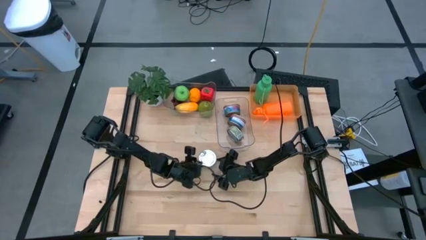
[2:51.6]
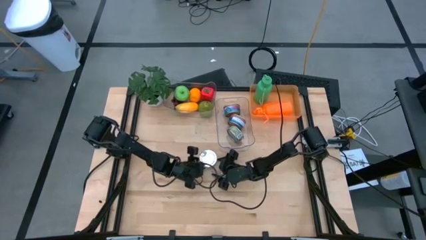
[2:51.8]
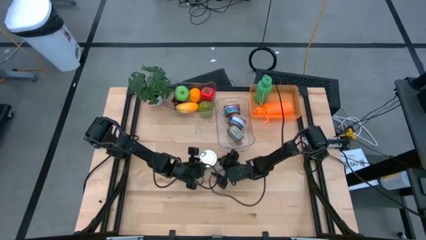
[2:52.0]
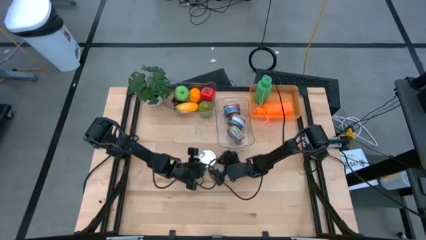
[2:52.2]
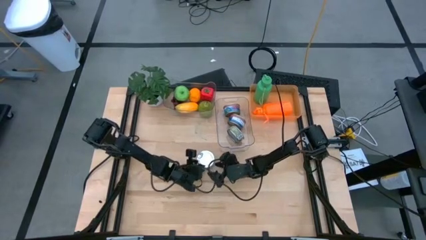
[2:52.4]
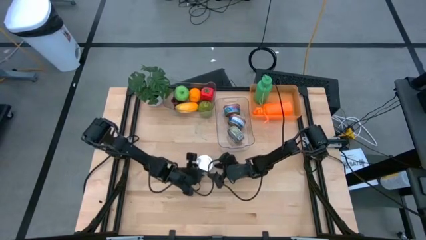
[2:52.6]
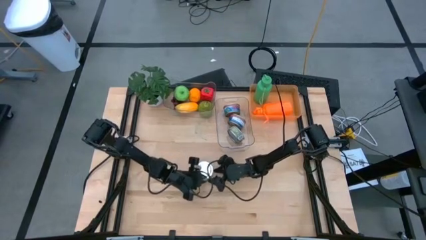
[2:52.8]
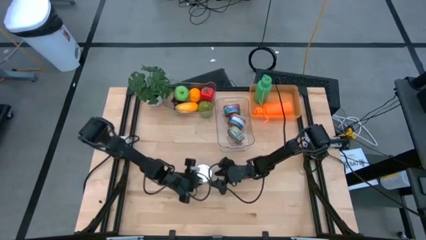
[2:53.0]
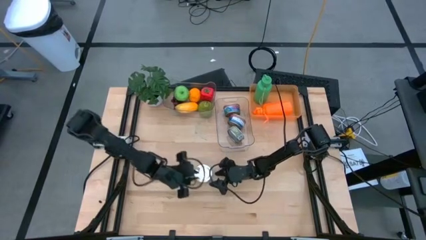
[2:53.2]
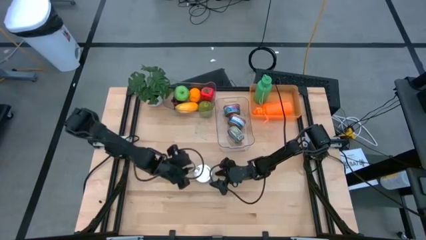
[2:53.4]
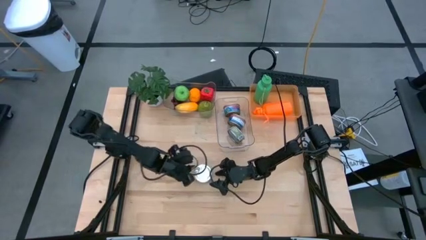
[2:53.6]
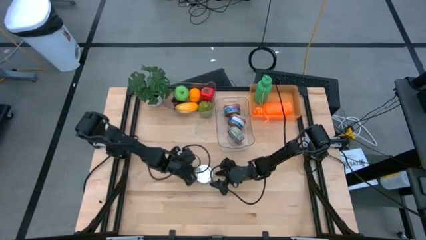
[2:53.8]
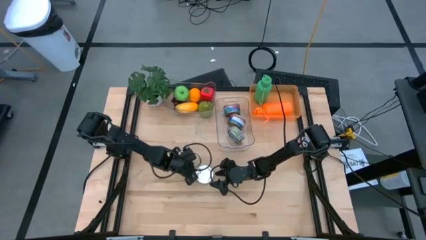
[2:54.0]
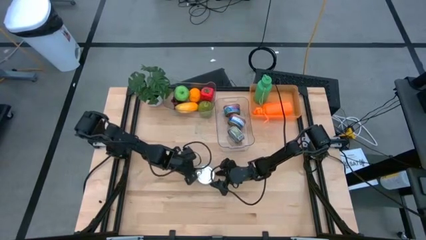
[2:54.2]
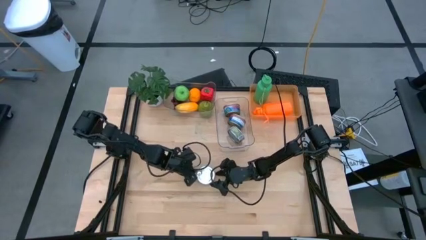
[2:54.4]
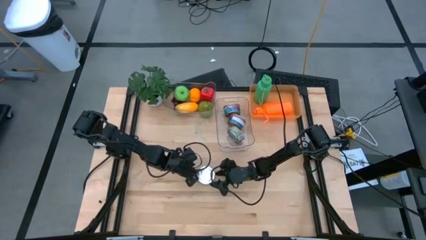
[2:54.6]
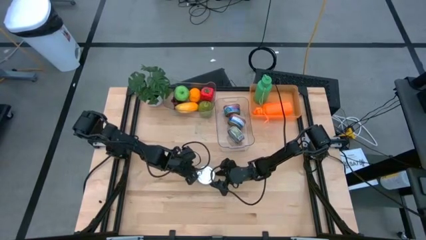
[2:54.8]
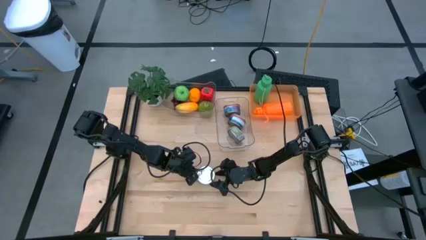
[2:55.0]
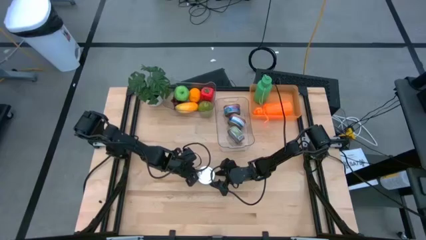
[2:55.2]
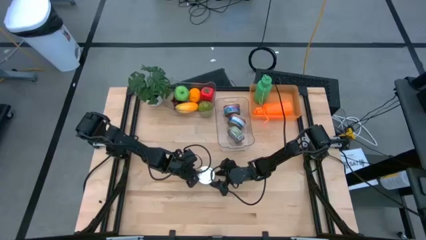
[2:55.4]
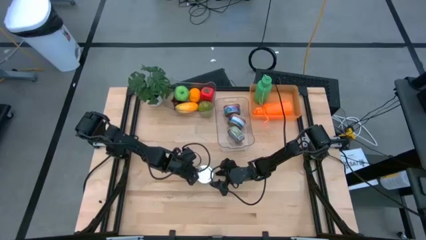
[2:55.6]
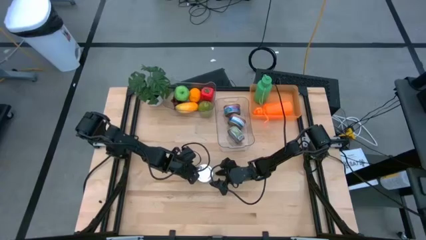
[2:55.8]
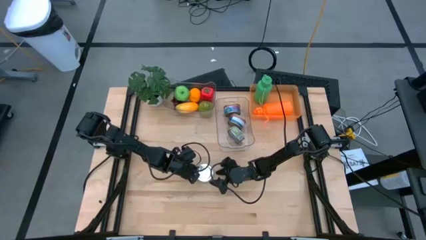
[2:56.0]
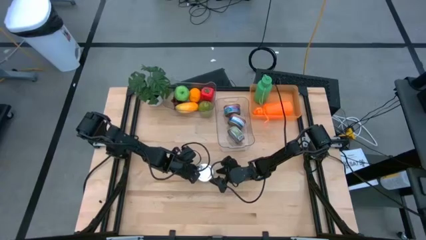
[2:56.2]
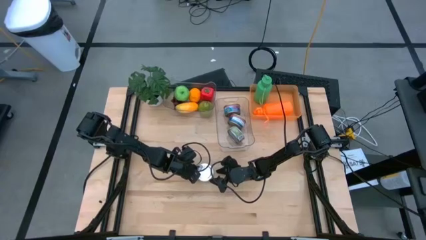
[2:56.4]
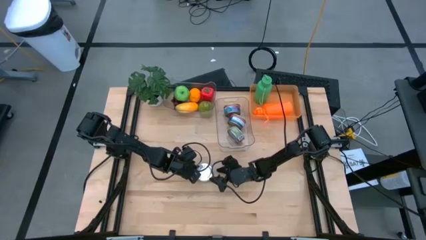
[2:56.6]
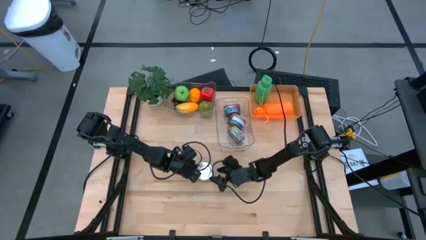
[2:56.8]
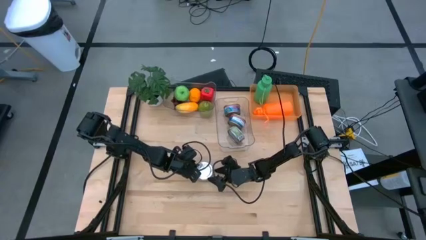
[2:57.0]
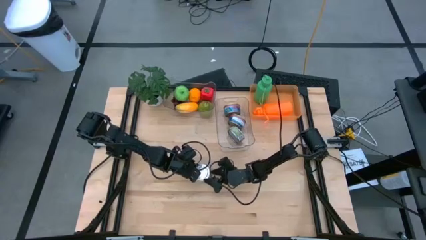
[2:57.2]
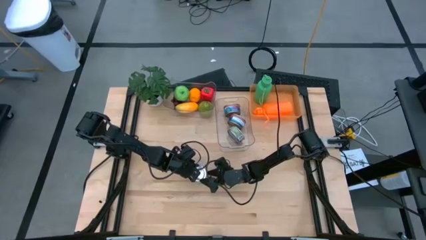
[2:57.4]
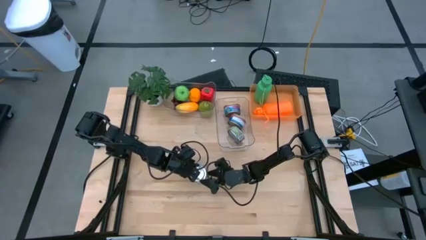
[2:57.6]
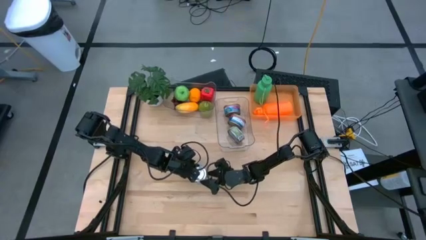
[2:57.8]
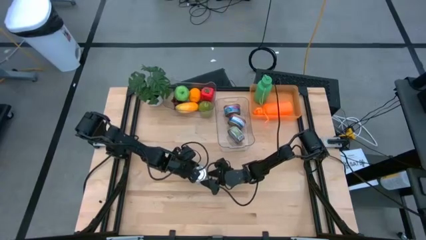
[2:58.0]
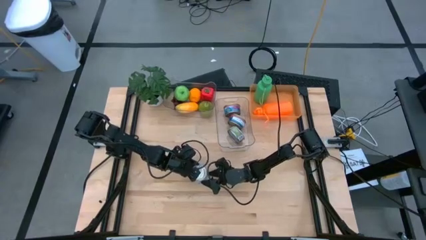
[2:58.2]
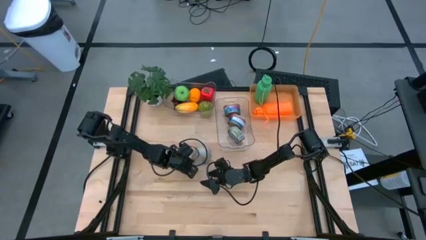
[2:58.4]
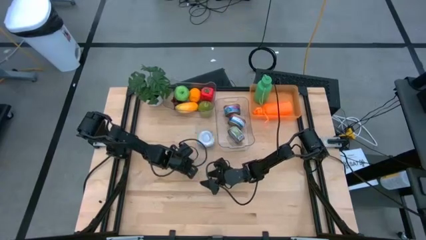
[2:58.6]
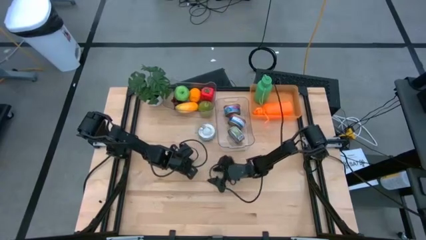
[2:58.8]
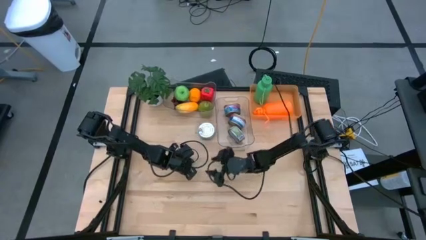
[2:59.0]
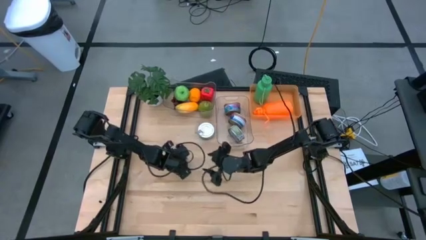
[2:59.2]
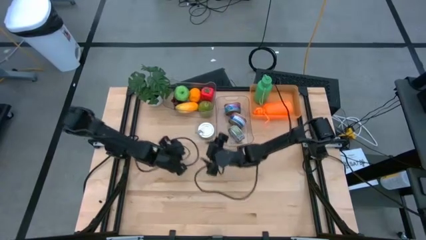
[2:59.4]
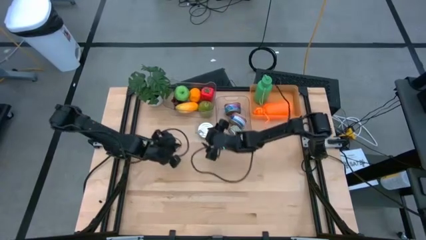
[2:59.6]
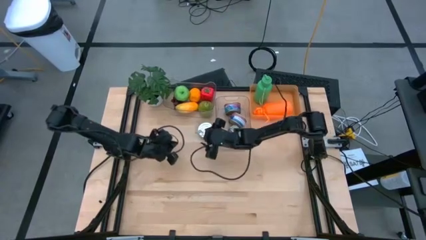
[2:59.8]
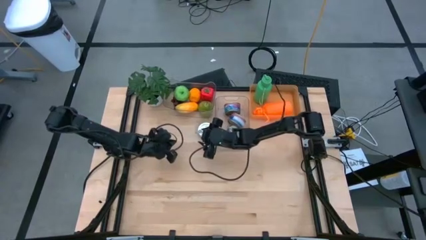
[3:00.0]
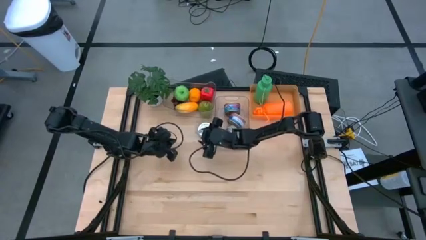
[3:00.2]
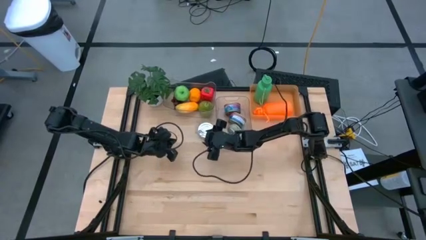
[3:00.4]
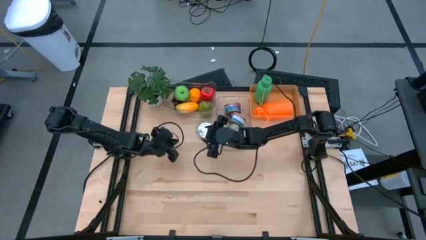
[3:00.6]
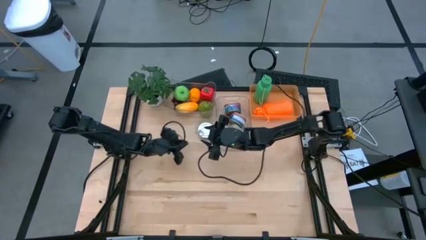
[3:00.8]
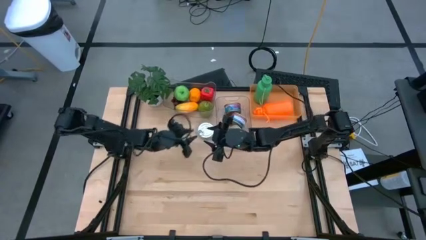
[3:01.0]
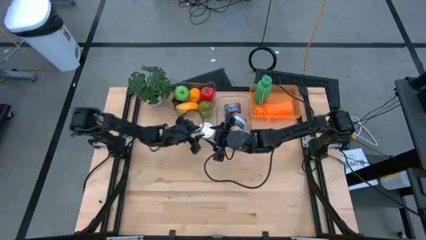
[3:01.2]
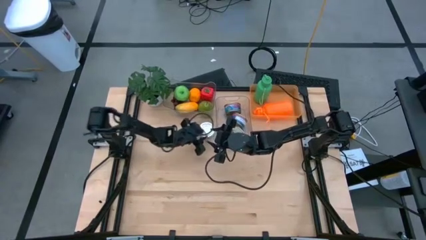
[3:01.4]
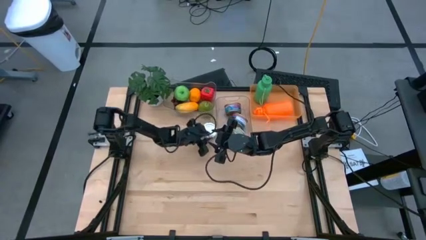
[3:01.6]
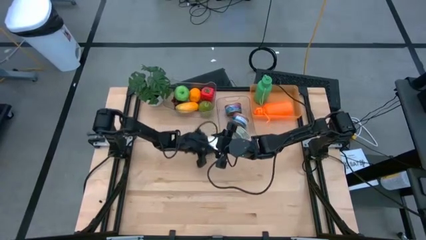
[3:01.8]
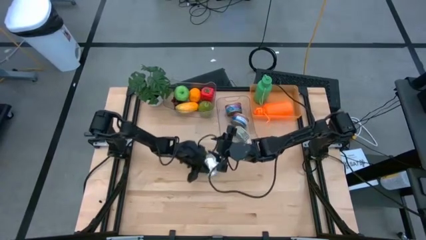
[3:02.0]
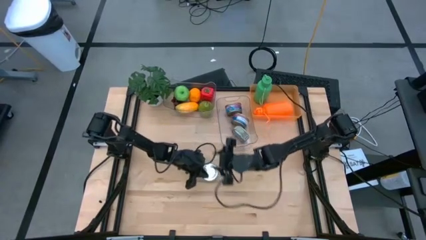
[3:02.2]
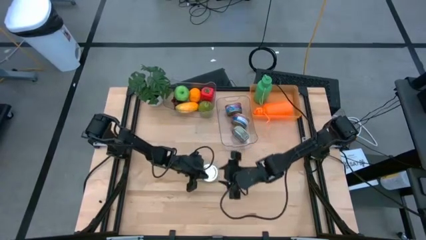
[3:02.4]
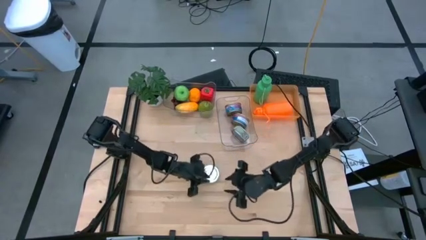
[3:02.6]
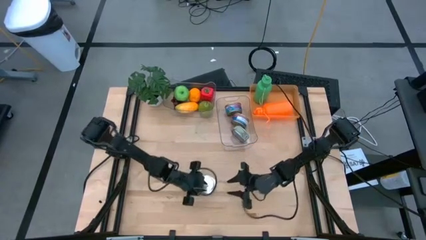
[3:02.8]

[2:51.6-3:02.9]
Task: Pick & Place Food Item
Put the green tuna can into the bottom transparent bin

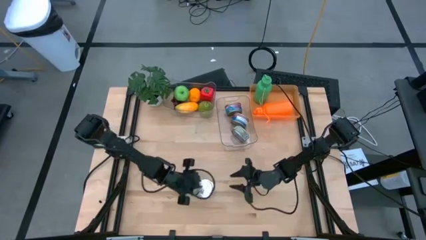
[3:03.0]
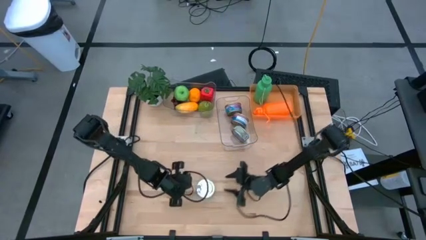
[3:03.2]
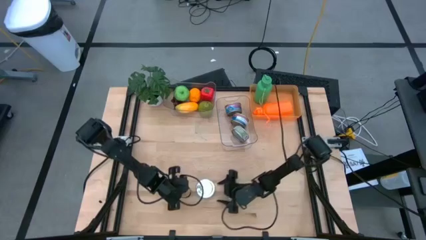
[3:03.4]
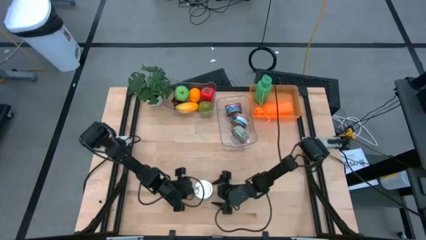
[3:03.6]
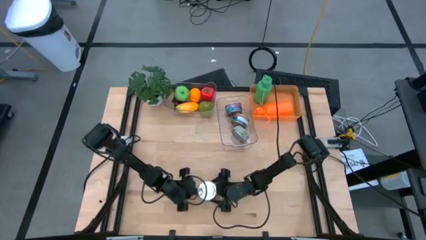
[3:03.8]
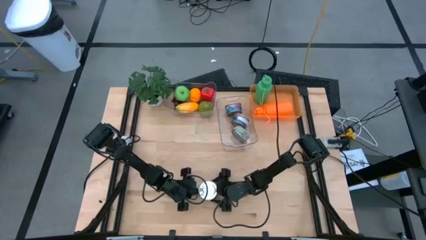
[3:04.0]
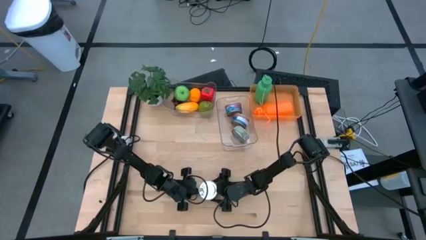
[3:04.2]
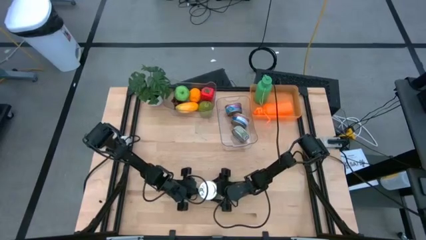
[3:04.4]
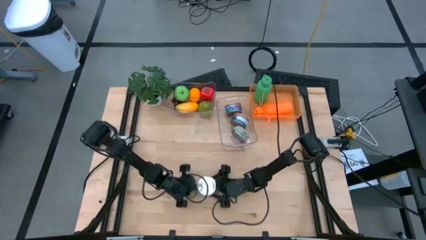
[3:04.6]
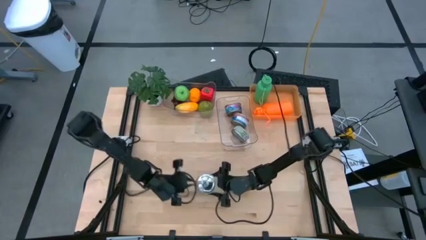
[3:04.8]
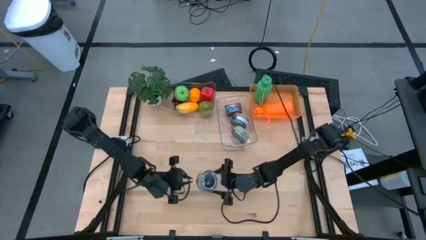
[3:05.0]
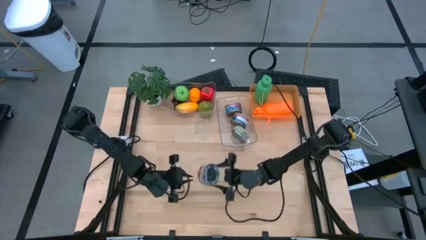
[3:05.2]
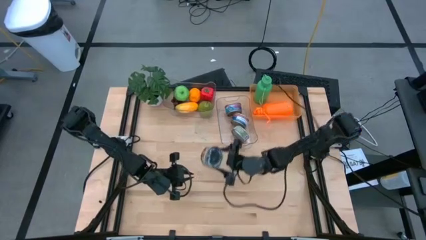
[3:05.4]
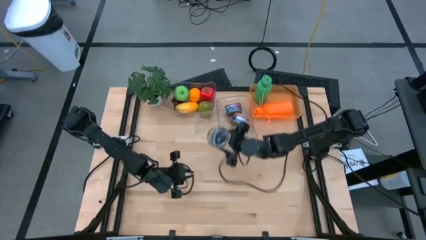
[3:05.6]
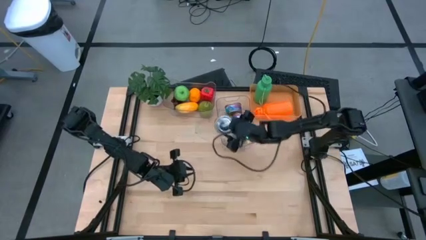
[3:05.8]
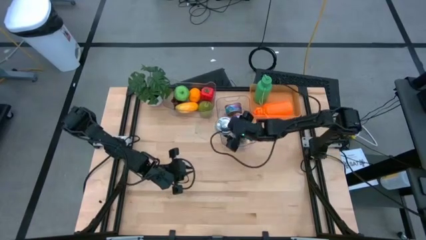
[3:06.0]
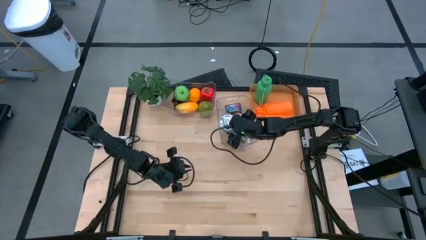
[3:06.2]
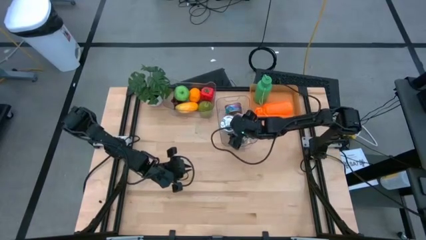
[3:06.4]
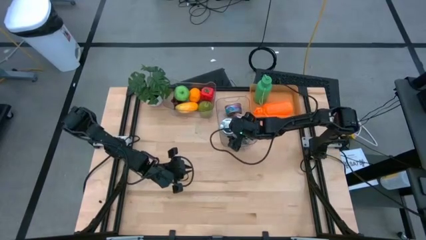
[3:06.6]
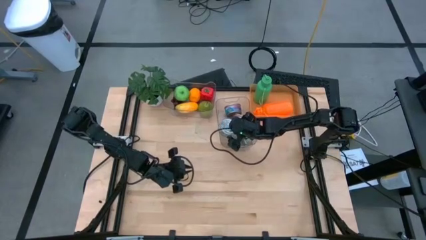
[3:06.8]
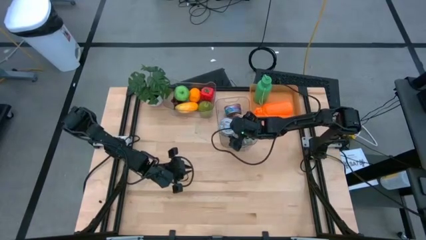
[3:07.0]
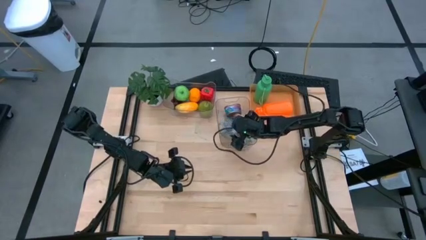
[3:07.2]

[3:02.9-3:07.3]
Put the green tuna can into the bottom transparent bin
